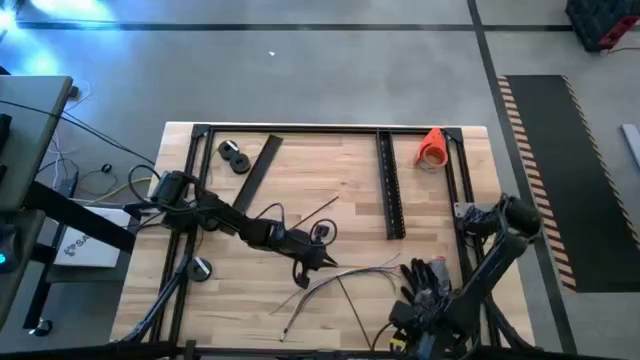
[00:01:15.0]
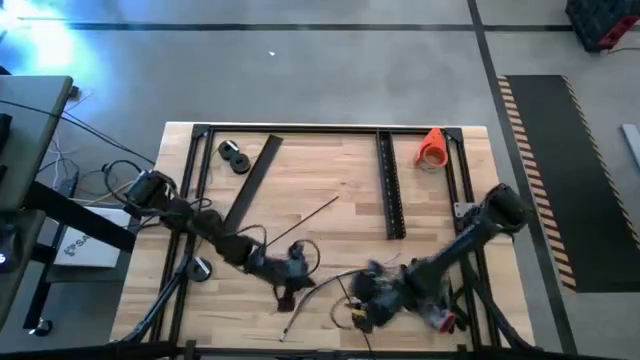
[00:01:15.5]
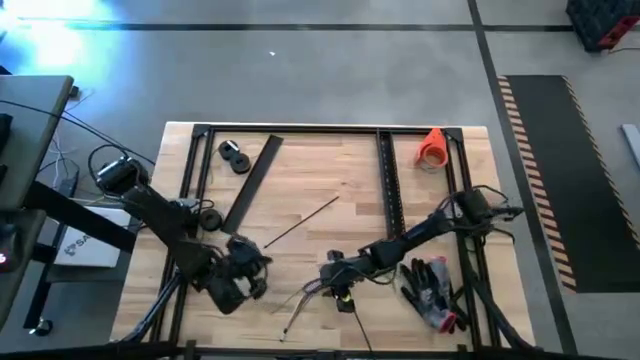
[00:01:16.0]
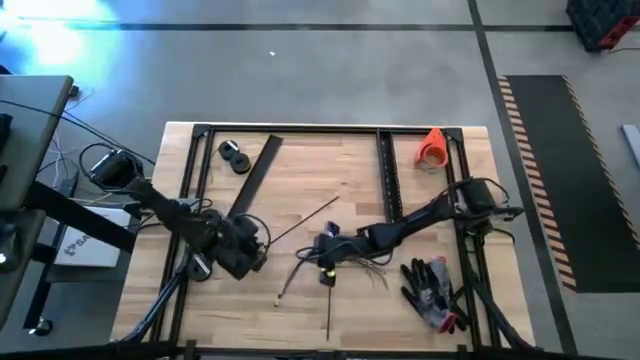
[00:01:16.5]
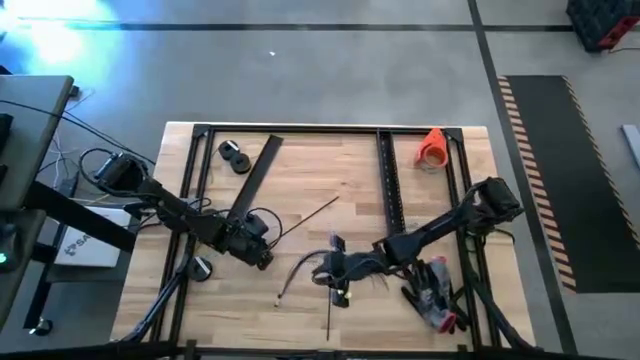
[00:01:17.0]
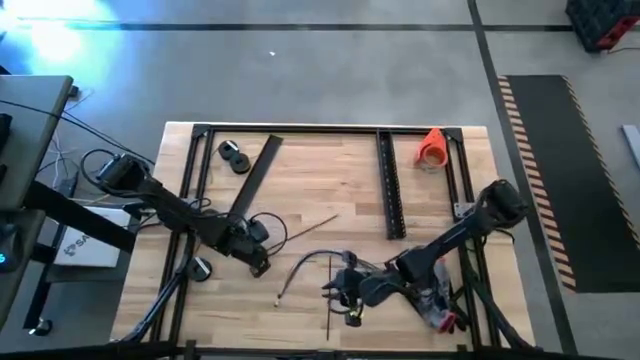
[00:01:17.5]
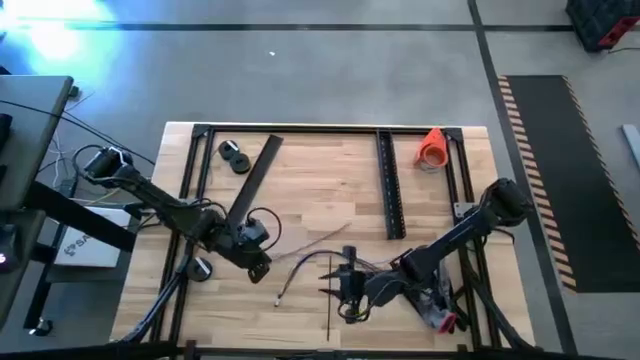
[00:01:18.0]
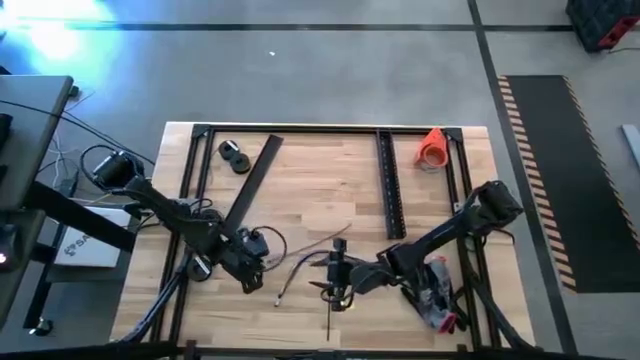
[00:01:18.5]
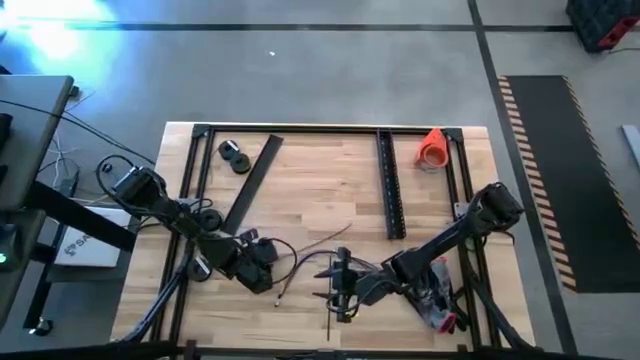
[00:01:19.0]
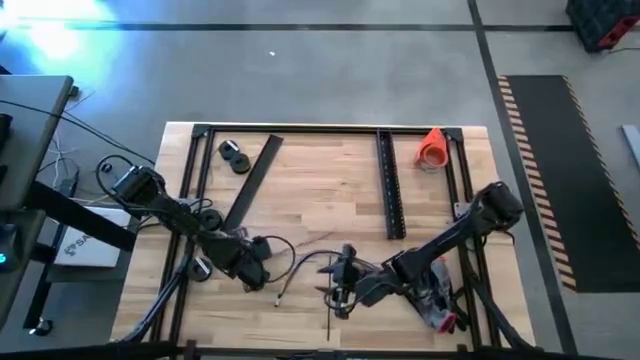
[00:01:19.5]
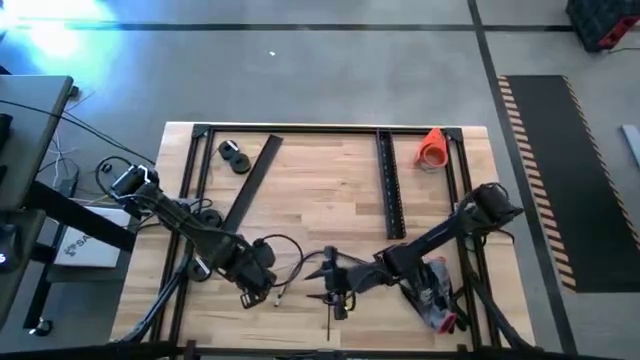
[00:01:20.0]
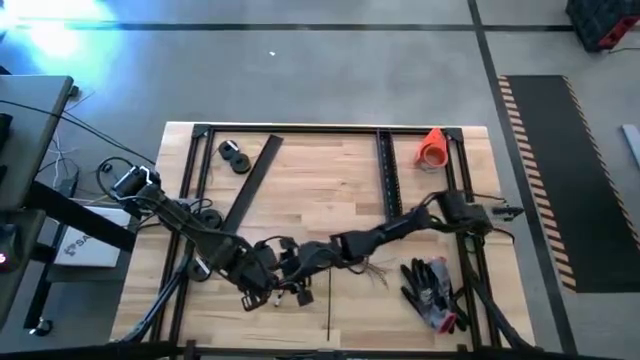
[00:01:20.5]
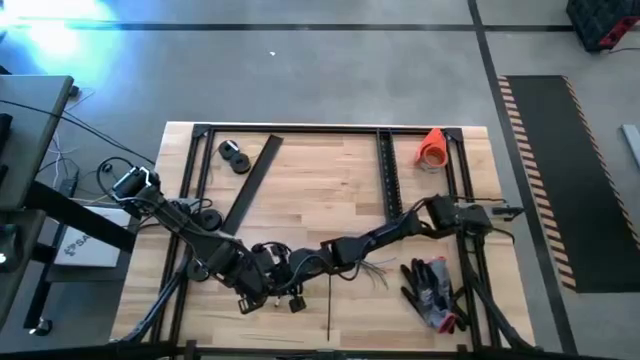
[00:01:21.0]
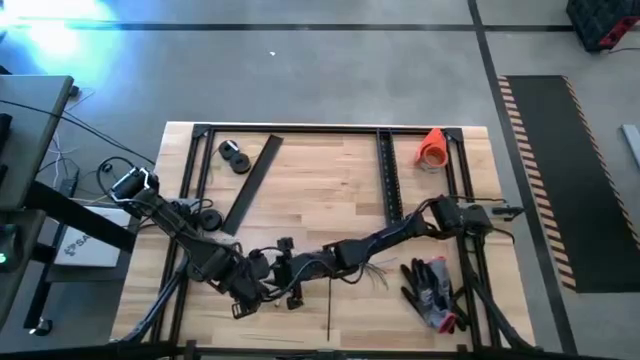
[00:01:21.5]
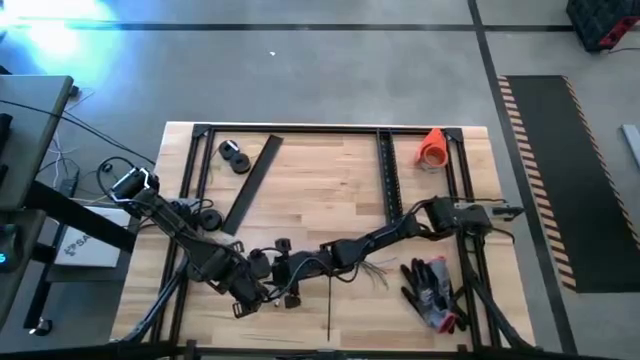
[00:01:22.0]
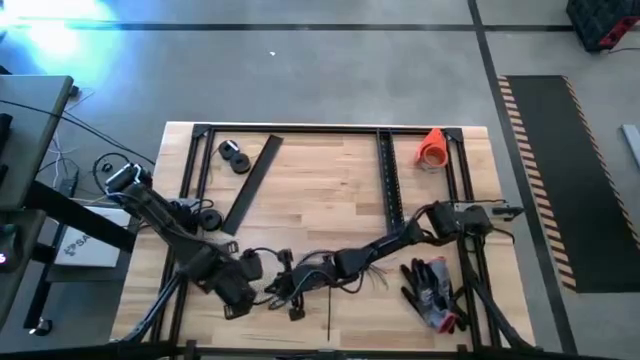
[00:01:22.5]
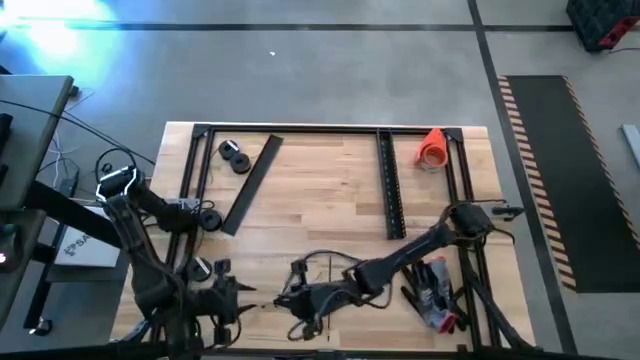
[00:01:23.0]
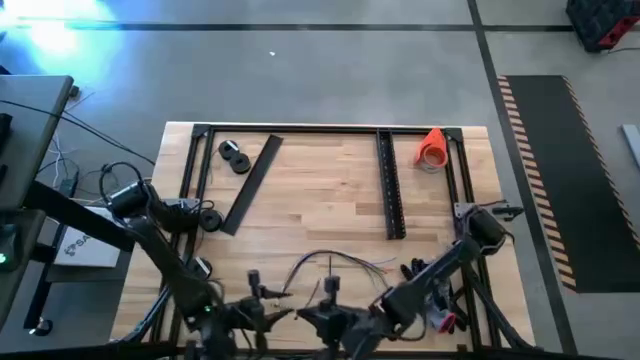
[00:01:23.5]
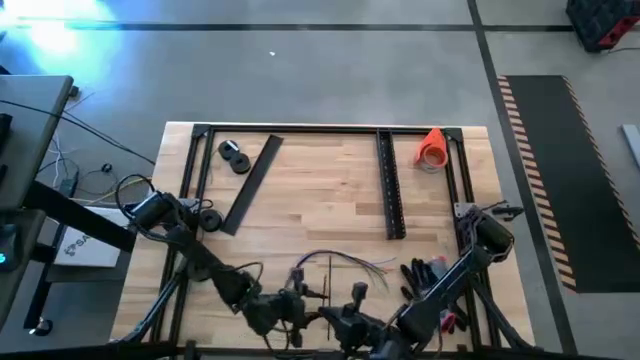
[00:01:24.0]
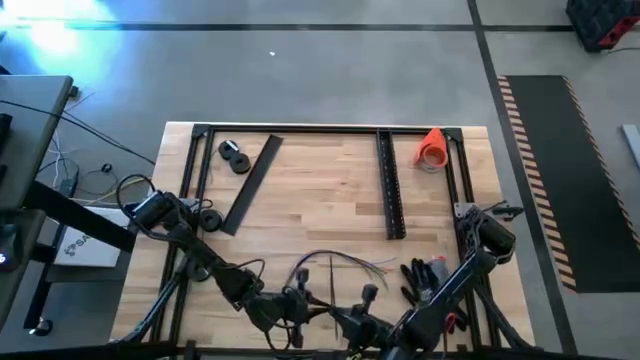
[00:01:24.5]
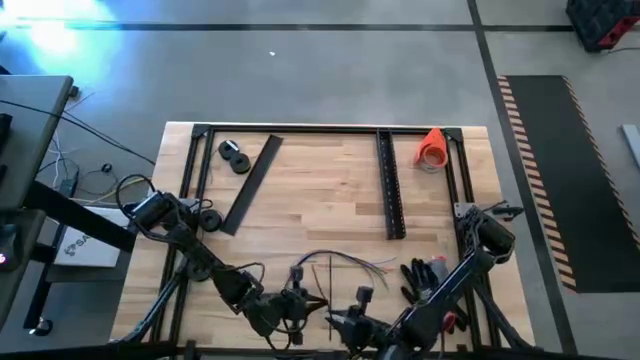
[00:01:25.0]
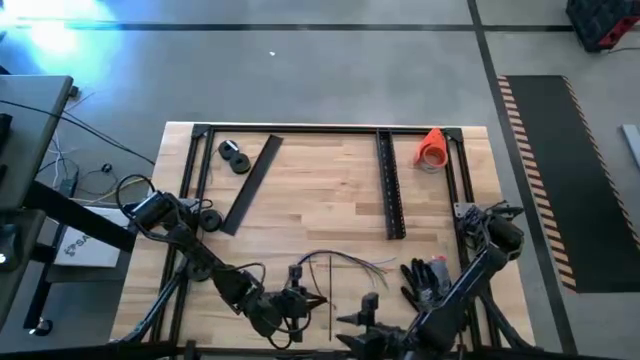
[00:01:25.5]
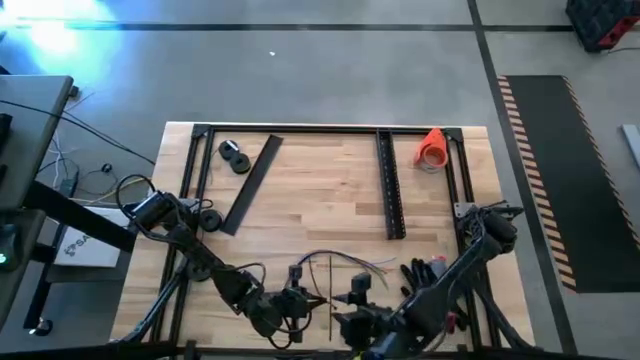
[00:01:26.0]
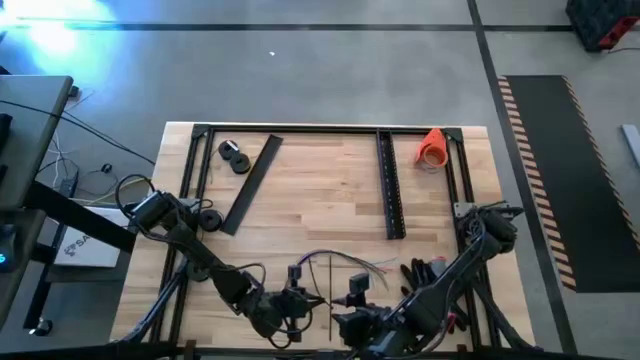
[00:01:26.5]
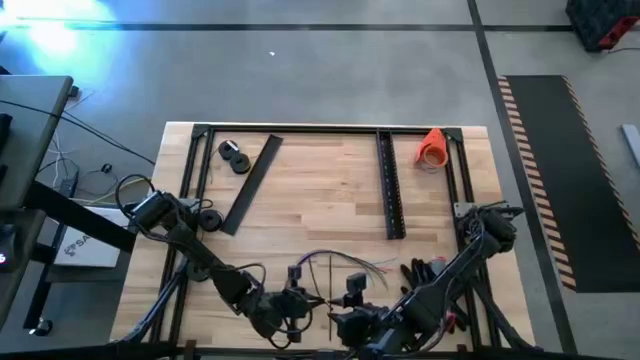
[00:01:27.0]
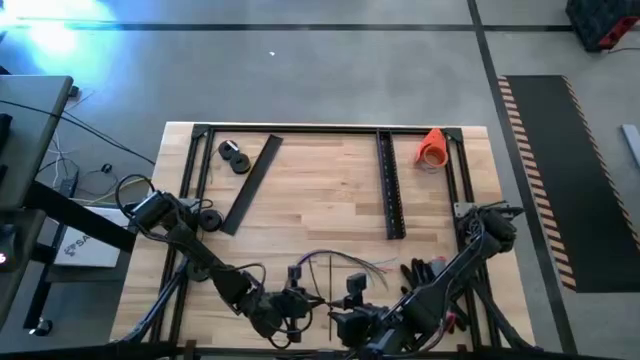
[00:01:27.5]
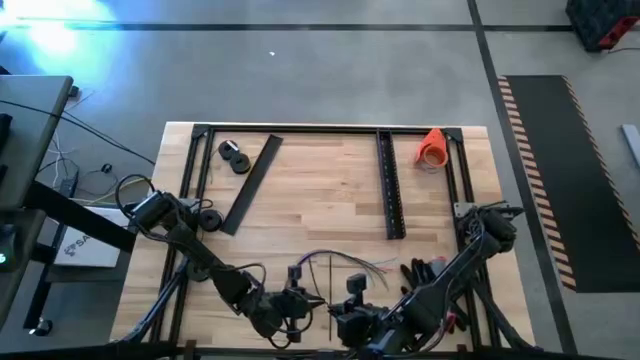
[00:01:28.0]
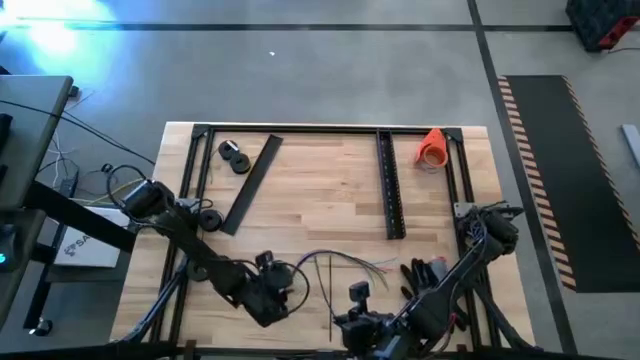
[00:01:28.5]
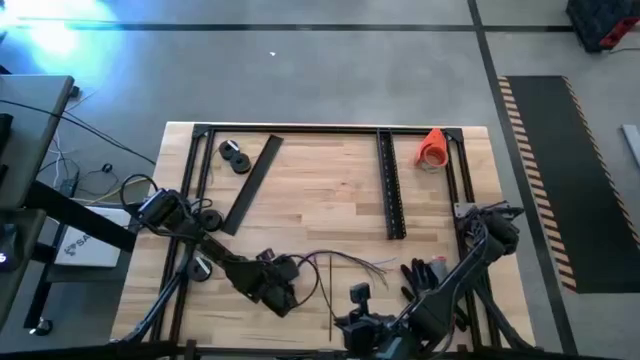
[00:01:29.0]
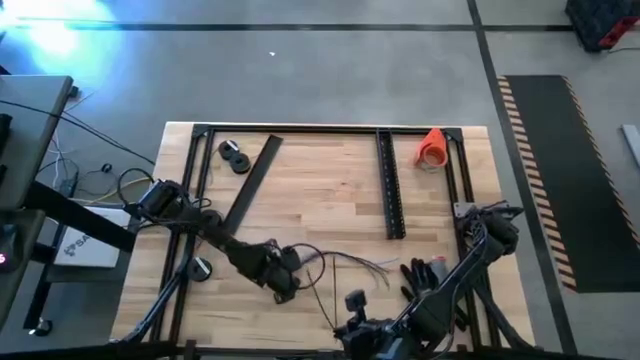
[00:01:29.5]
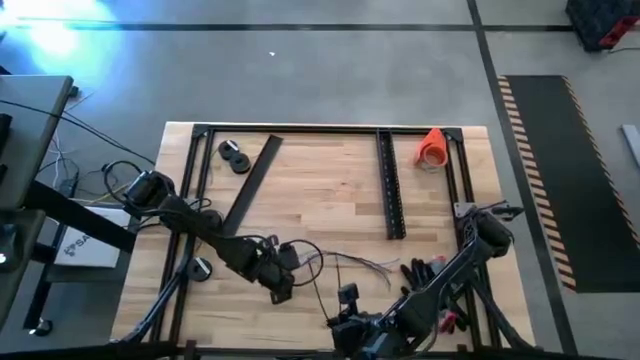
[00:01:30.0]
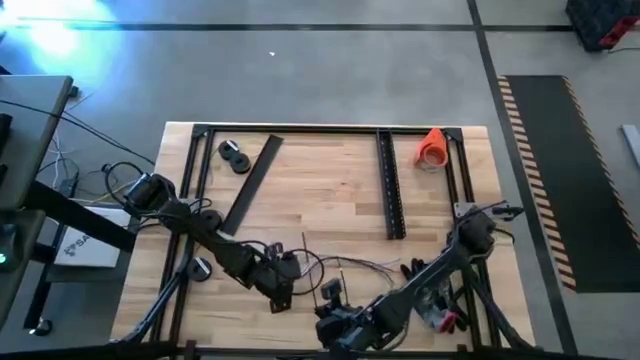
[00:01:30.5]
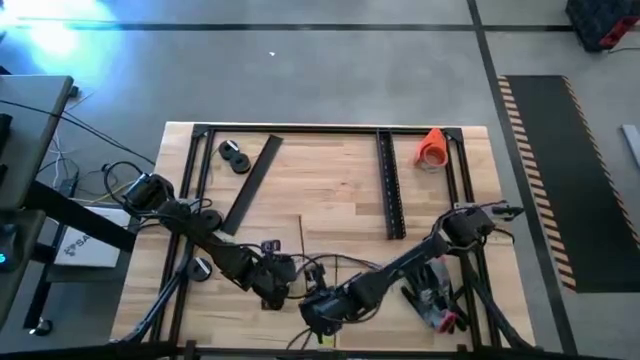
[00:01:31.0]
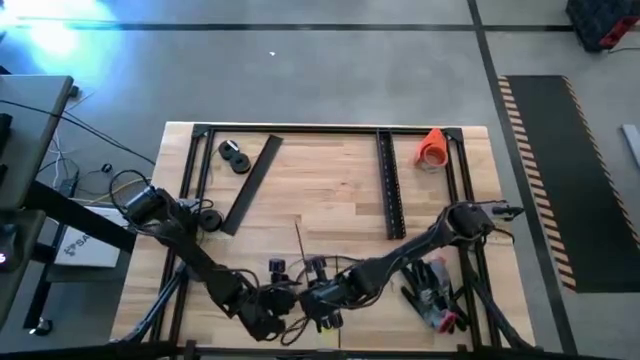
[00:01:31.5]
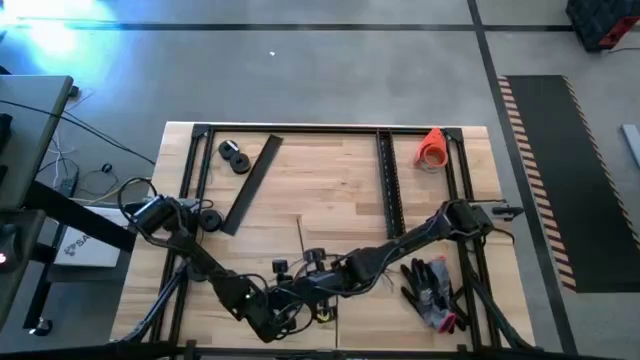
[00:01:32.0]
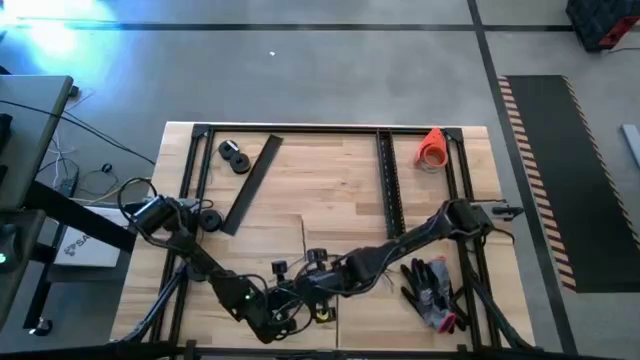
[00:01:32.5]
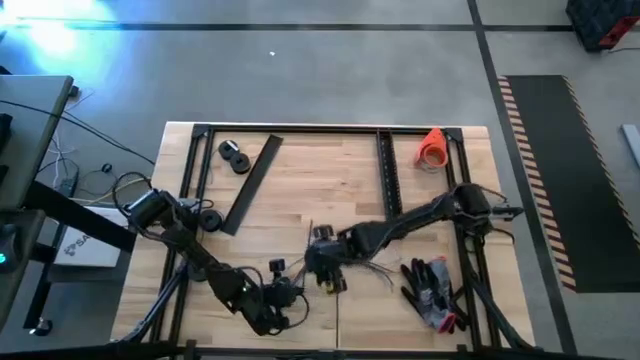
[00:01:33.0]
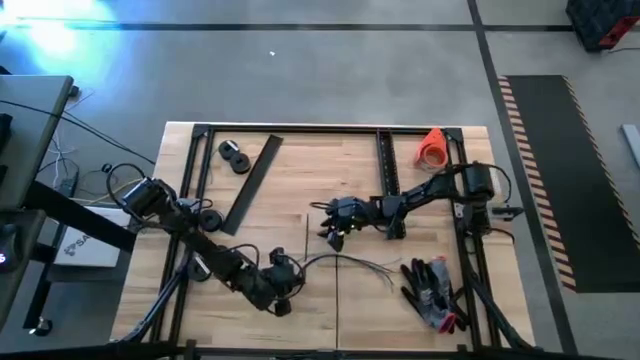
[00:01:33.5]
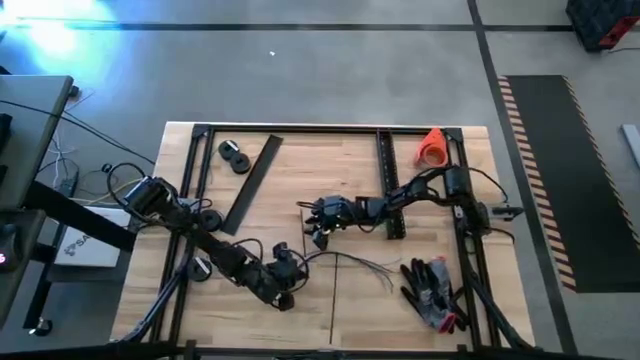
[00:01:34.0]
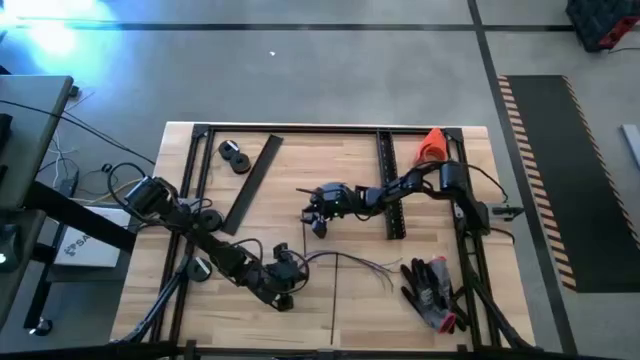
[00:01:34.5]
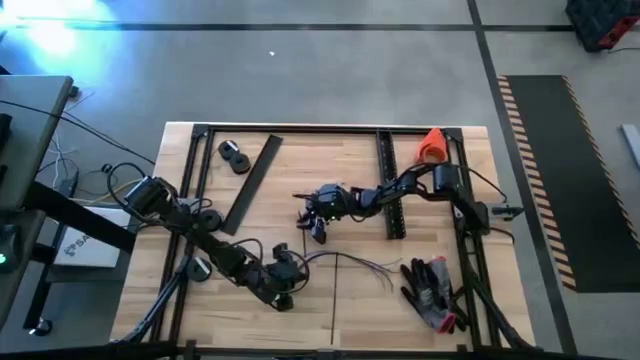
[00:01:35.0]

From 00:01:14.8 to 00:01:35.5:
Task: Ziptie cables
Wrap the black zip tie on the cables

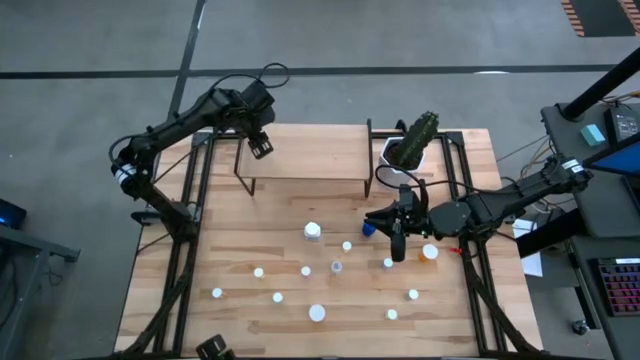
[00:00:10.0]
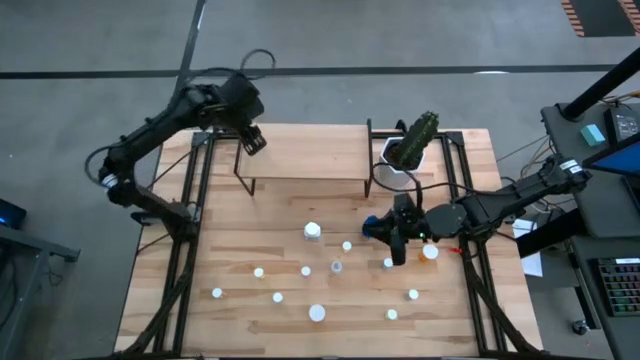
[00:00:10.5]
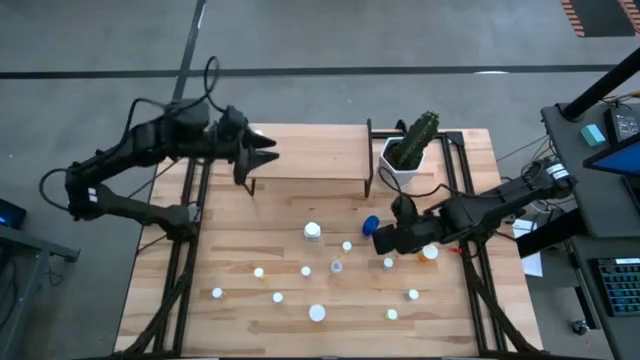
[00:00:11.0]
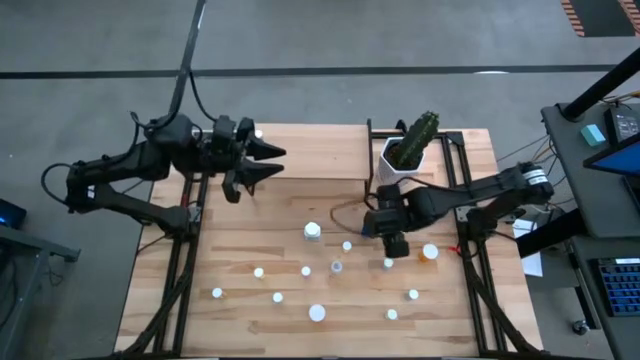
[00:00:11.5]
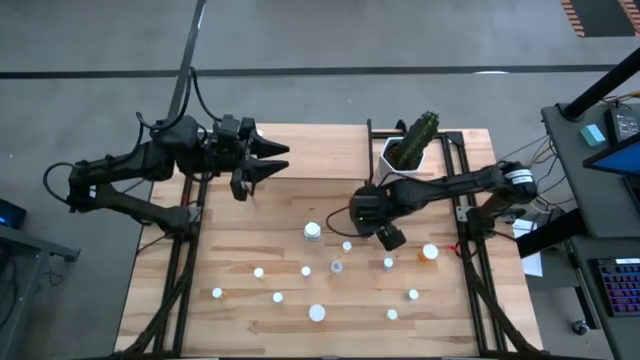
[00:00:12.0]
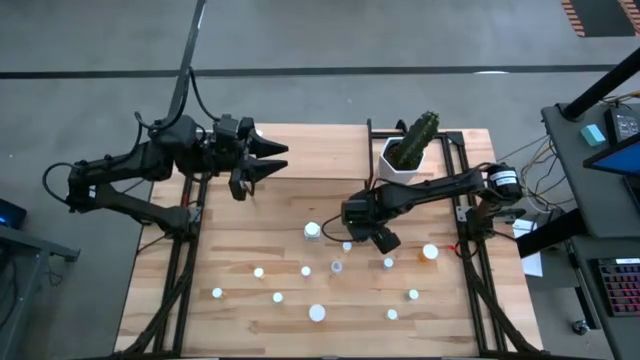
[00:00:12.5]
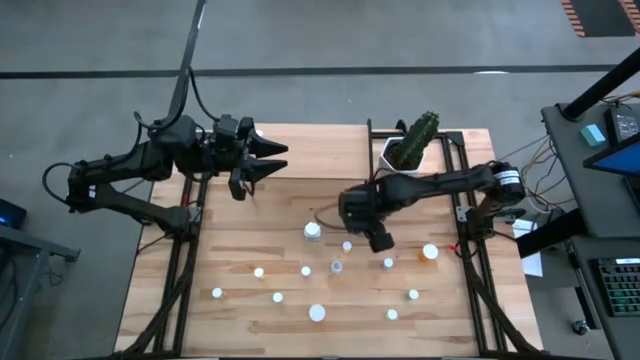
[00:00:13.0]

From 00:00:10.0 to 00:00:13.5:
Task: Pick and place medicine bottles onto shelf by color
Put the blue pill bottle on the shelf
